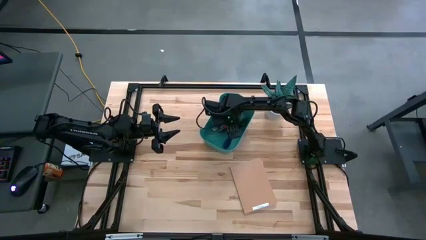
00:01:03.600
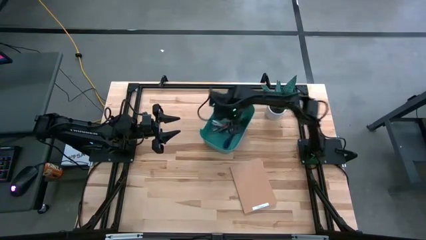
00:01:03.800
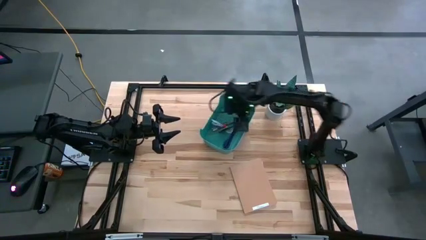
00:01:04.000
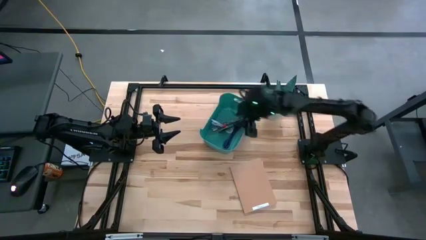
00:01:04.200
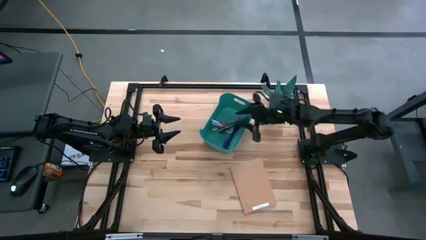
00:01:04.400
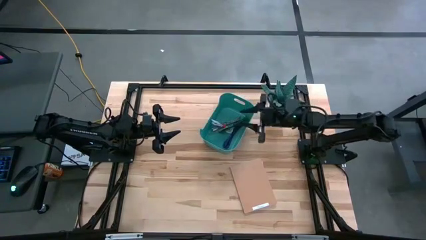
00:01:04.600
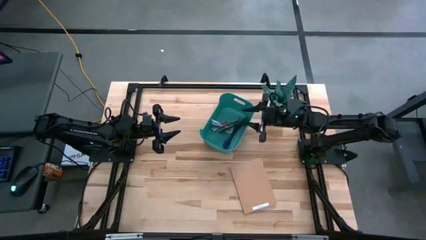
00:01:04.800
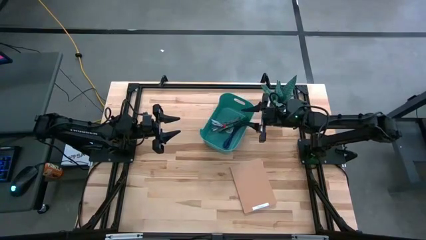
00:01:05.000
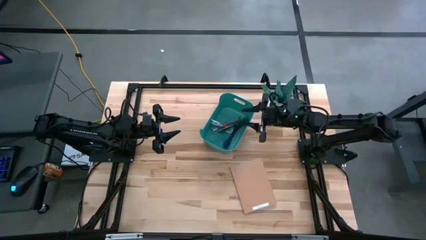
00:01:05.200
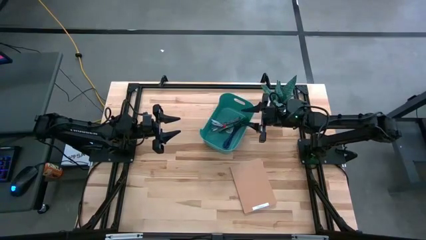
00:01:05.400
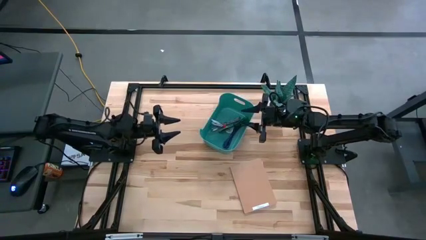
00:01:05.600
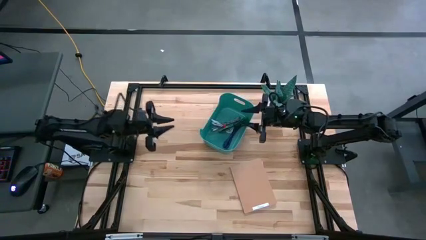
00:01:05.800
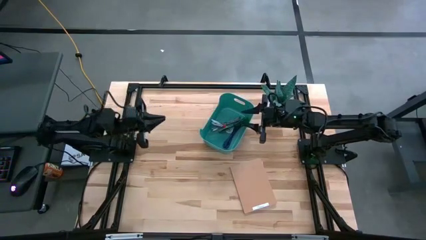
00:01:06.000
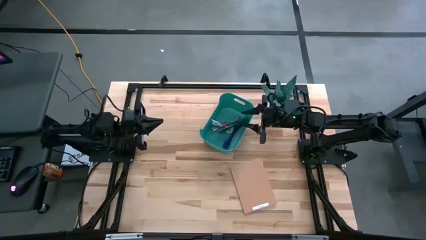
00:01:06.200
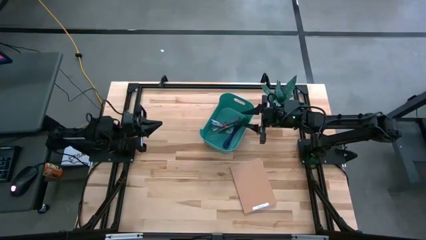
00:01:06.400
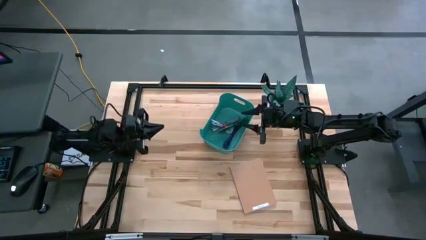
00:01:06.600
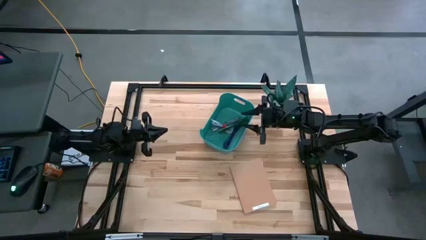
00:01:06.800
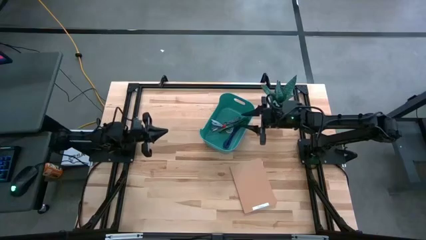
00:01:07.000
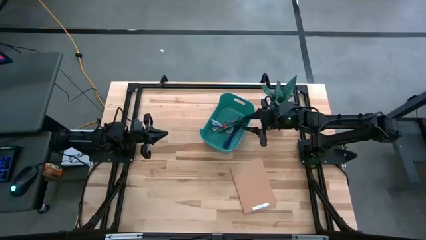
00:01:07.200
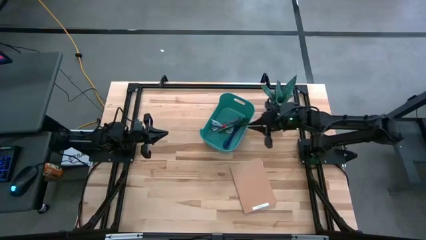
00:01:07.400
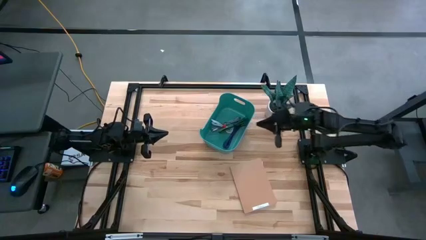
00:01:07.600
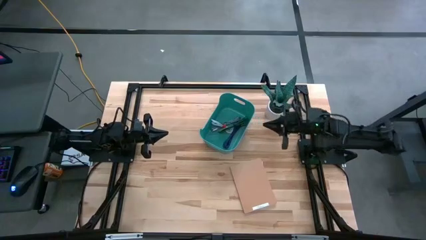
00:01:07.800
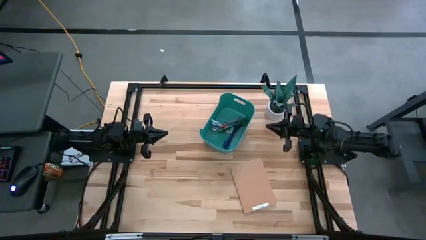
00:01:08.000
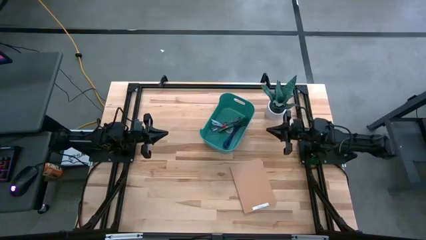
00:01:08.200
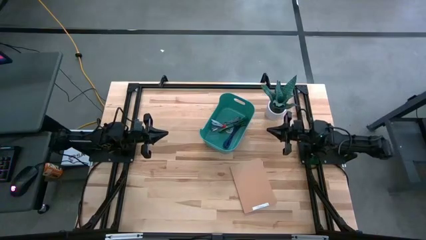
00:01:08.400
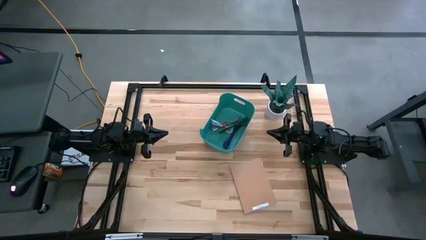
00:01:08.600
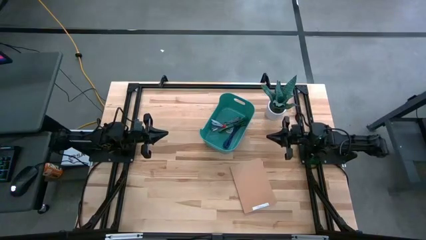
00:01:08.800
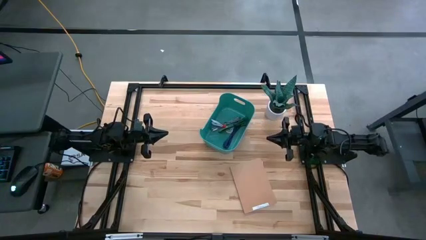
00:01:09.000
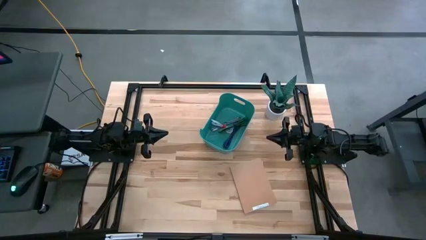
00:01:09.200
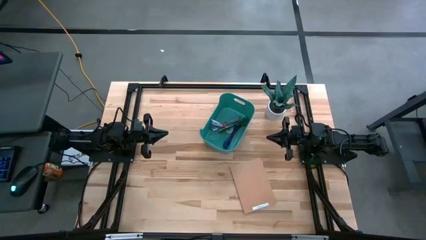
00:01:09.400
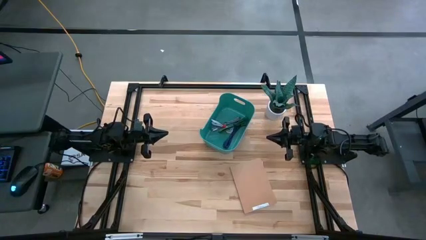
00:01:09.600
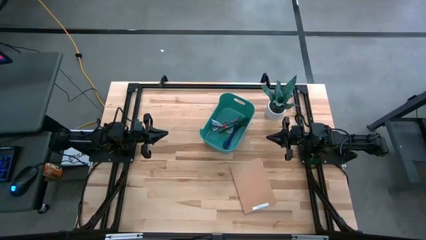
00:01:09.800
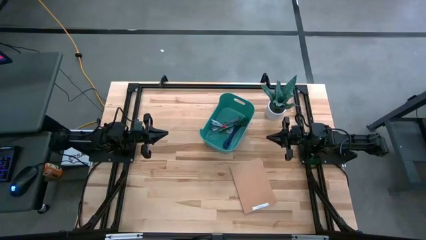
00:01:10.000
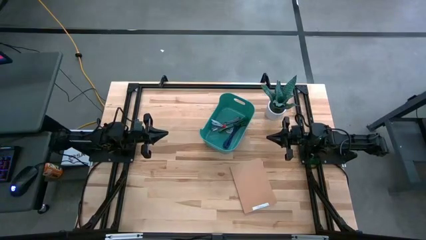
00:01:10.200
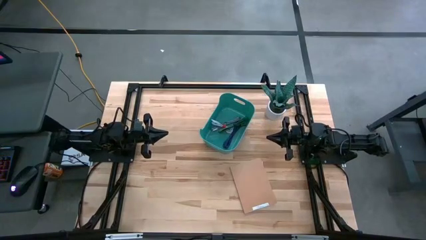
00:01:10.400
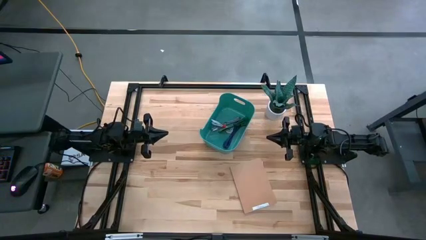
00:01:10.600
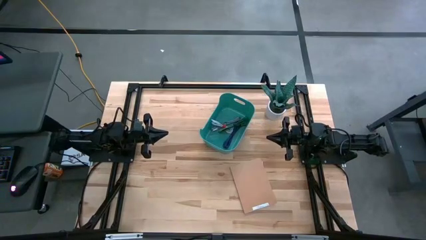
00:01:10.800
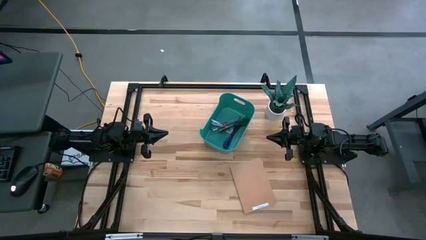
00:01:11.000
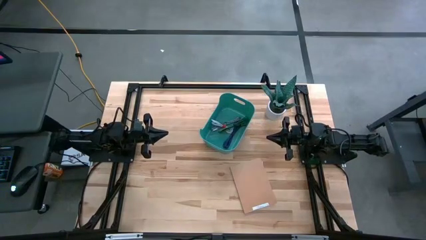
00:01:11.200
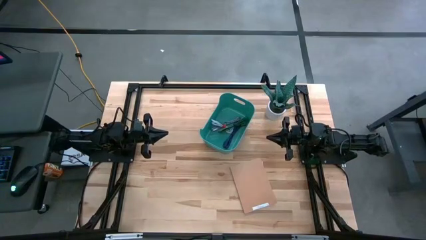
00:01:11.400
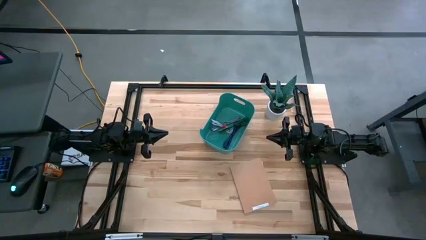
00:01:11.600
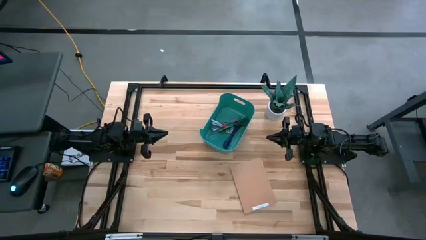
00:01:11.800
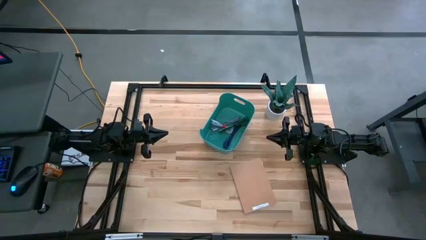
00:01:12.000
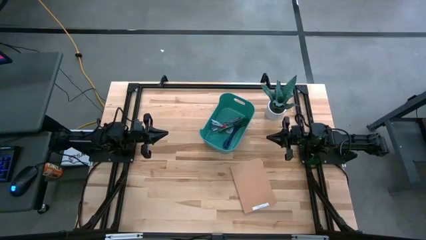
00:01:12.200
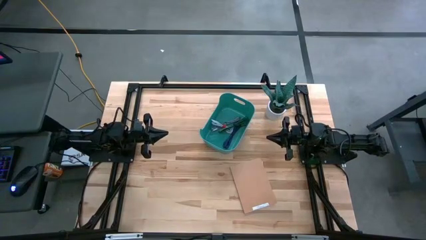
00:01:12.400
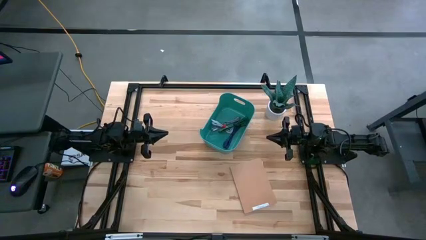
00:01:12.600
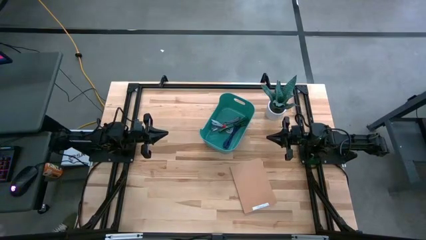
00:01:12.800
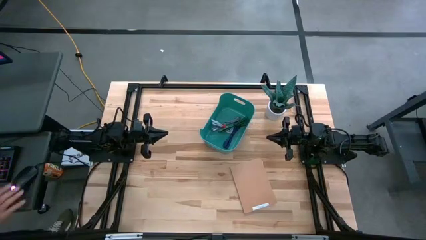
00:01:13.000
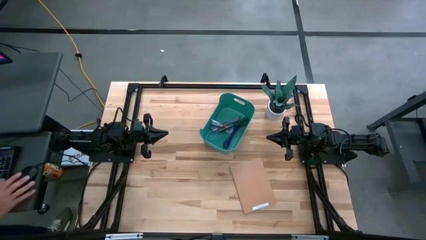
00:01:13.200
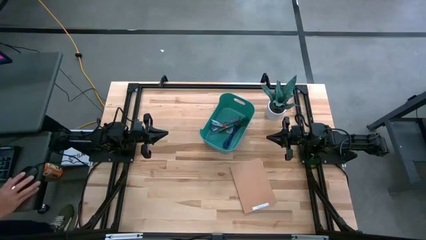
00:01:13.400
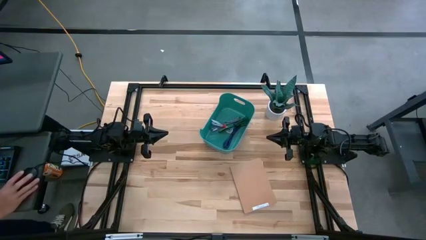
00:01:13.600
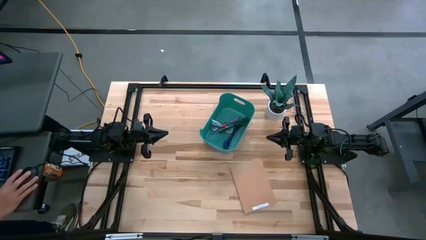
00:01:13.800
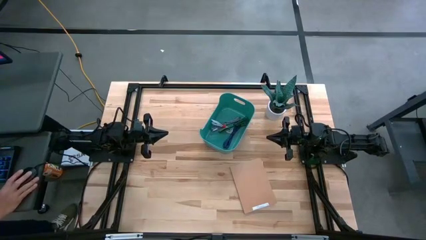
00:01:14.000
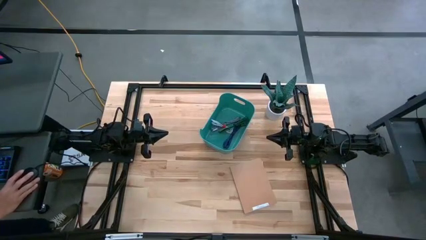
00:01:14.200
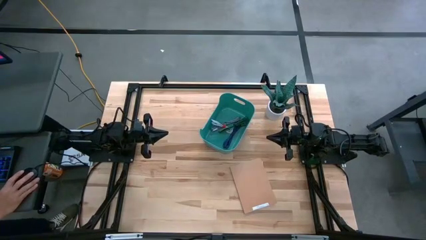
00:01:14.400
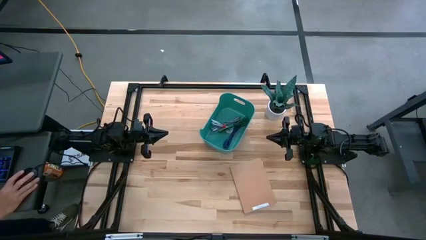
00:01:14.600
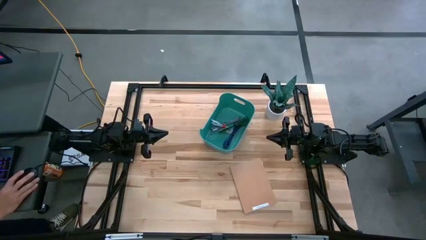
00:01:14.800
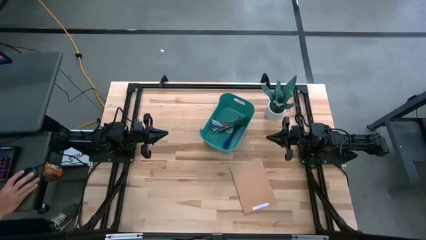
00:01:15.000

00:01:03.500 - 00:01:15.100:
Task: Pick and place USB-C Cables
Return to Home Position

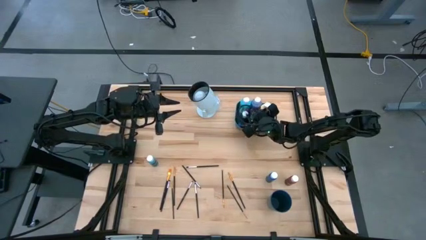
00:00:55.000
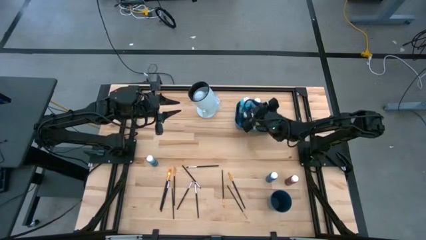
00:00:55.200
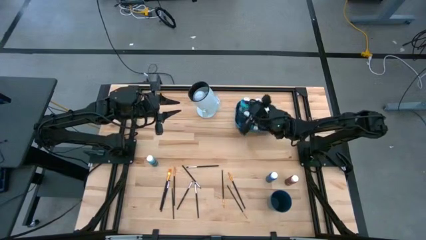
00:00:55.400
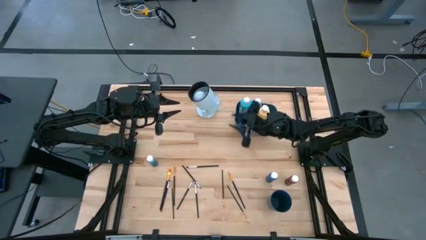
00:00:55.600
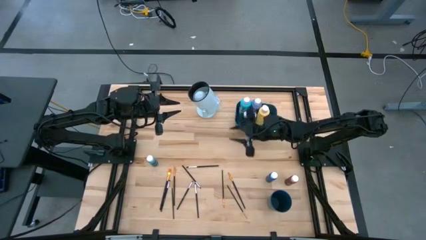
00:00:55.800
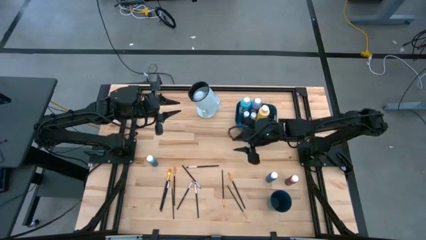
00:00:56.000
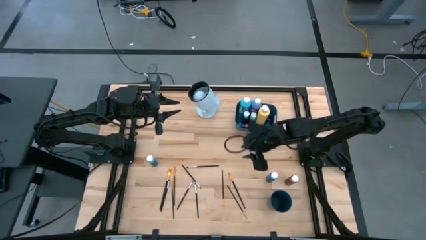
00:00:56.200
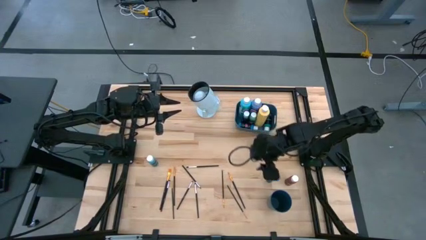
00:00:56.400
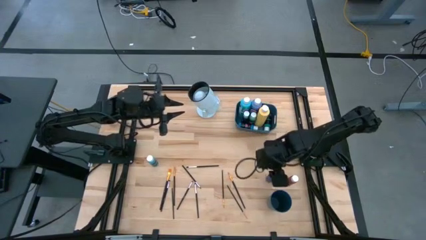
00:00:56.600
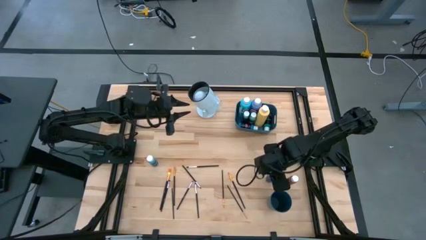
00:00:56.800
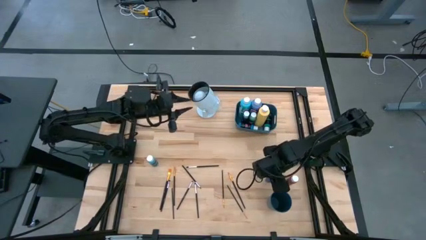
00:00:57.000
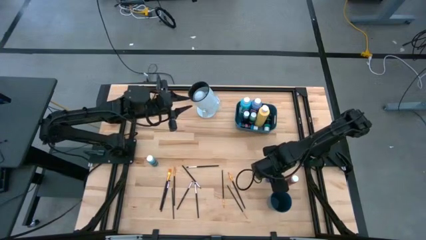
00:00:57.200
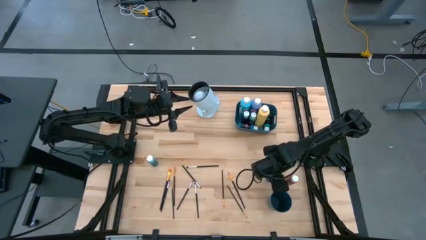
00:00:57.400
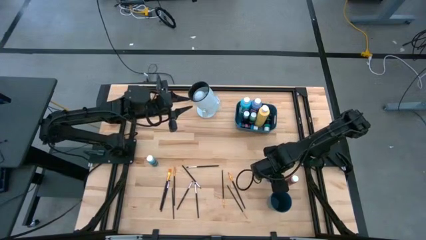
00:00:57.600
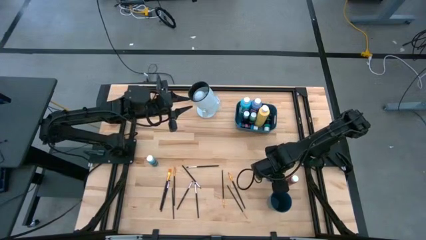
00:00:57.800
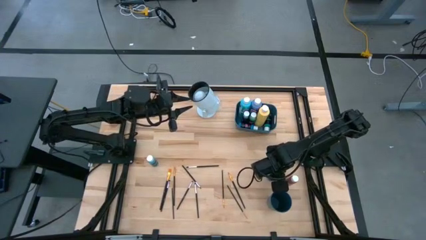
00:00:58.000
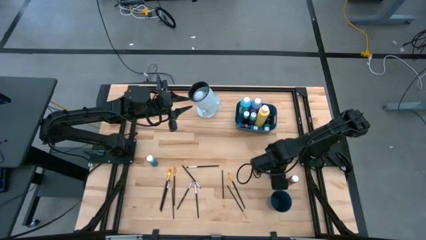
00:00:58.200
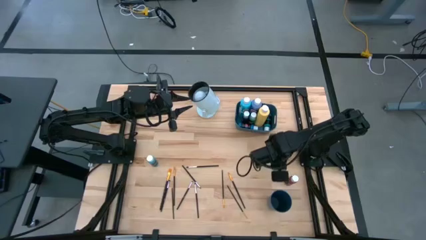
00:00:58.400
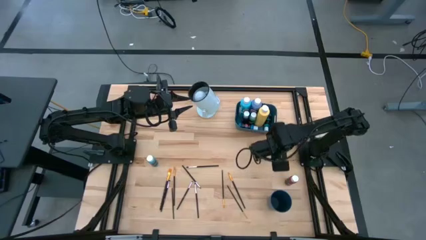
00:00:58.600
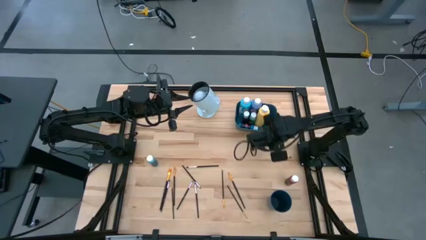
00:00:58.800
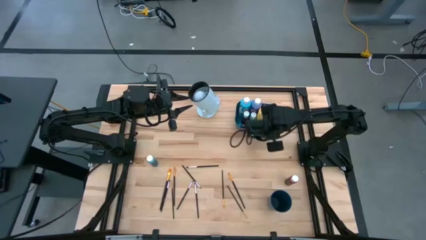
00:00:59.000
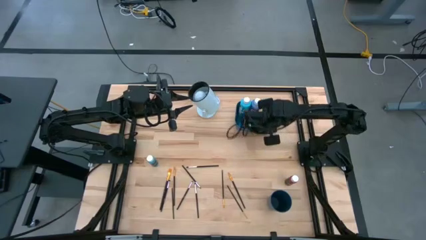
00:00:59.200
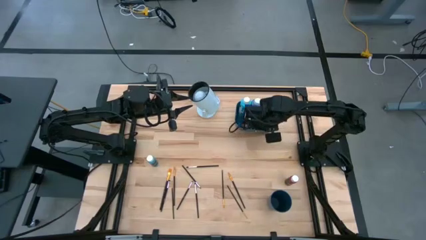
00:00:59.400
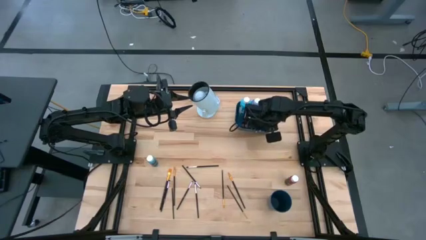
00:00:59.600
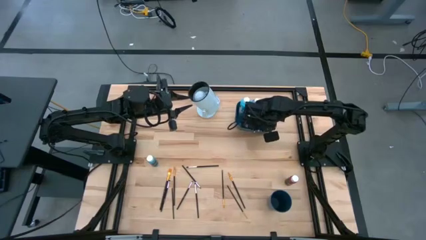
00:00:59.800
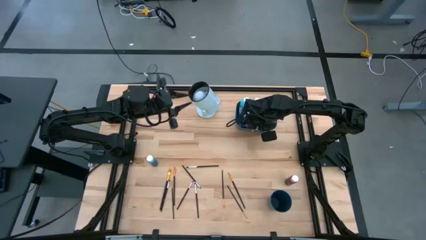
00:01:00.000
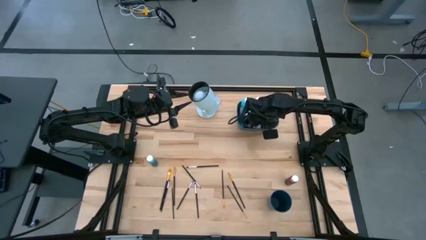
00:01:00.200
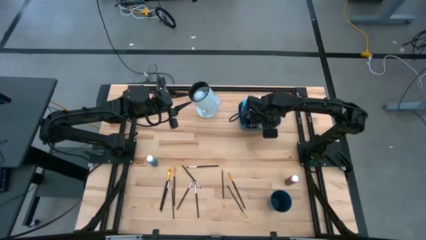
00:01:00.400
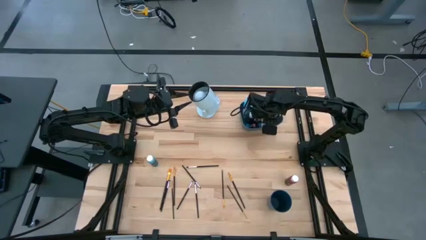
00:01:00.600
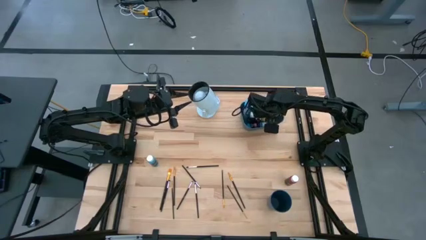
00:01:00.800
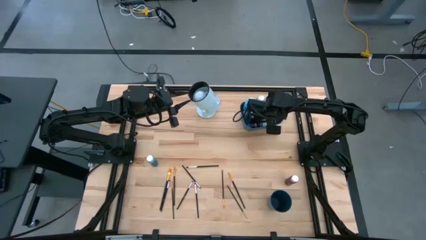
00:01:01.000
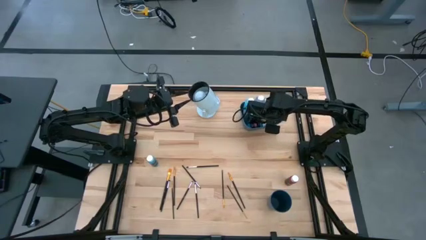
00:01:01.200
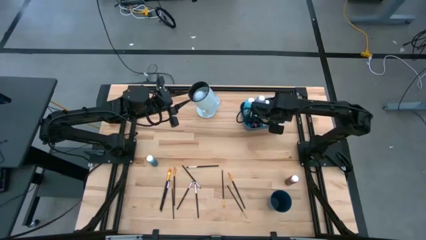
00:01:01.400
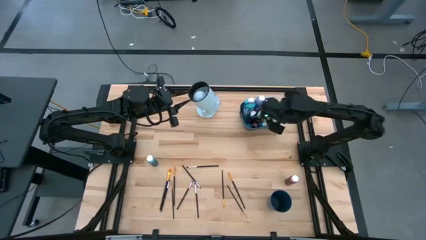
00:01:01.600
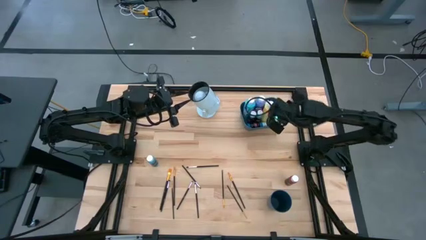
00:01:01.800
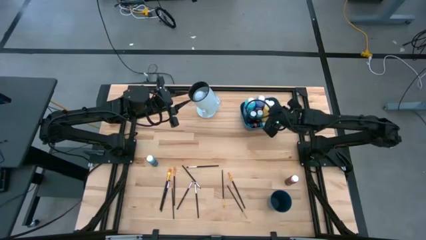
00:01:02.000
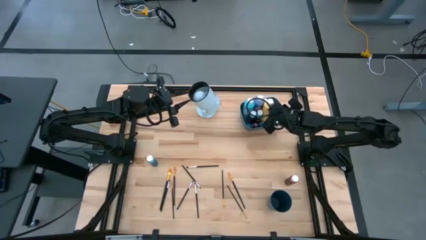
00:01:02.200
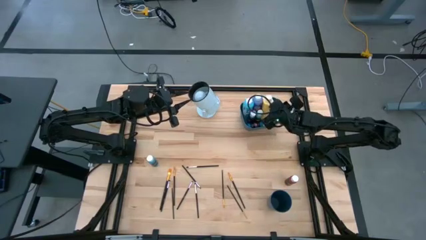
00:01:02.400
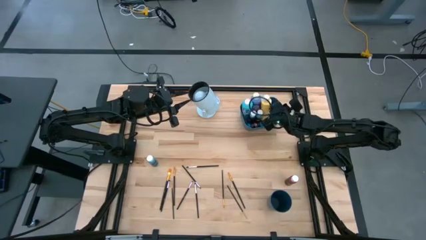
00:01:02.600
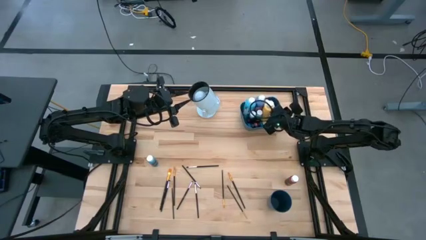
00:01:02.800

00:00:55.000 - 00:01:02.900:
Task: Pick & Place Paint Supplies
Put the small purple paint bottle into the blue bin
